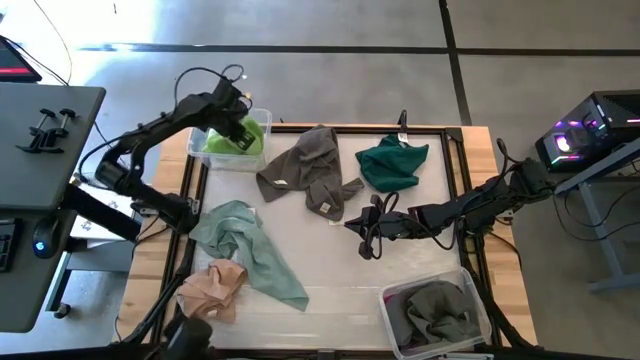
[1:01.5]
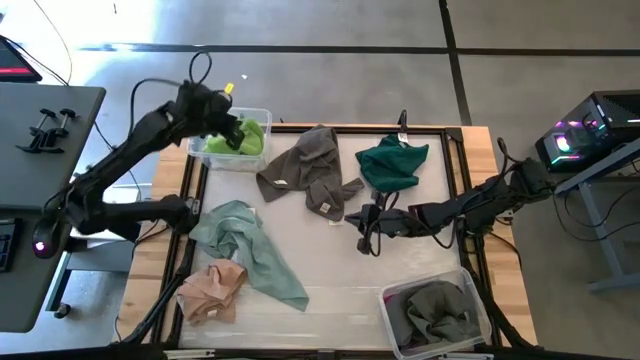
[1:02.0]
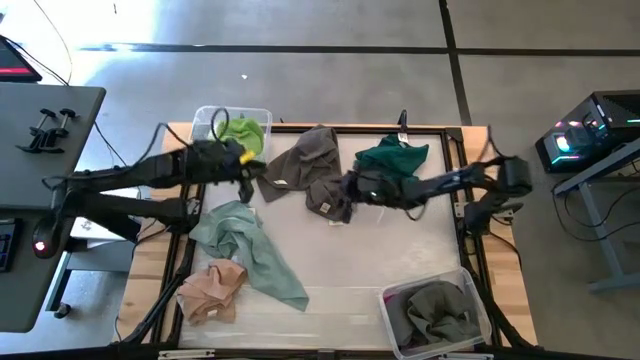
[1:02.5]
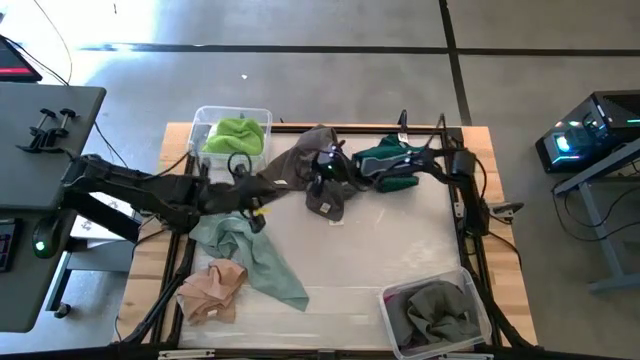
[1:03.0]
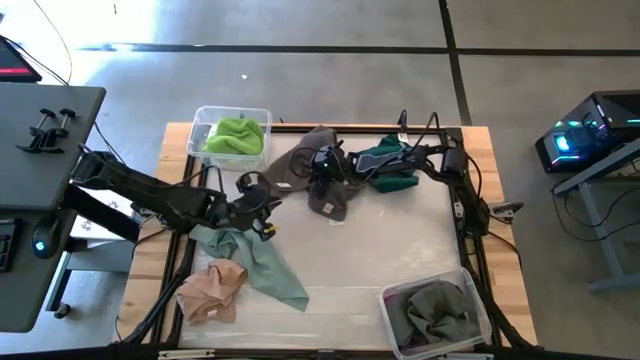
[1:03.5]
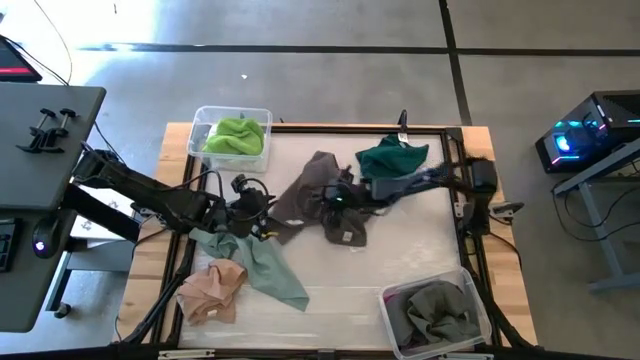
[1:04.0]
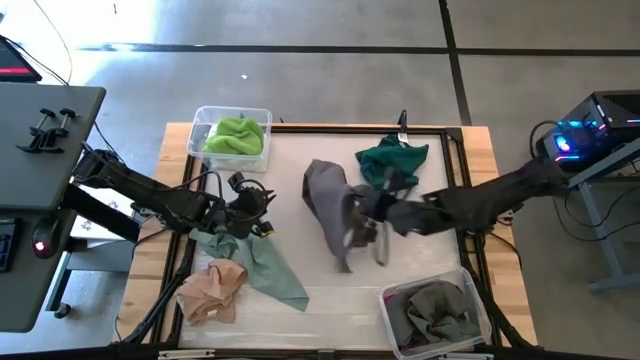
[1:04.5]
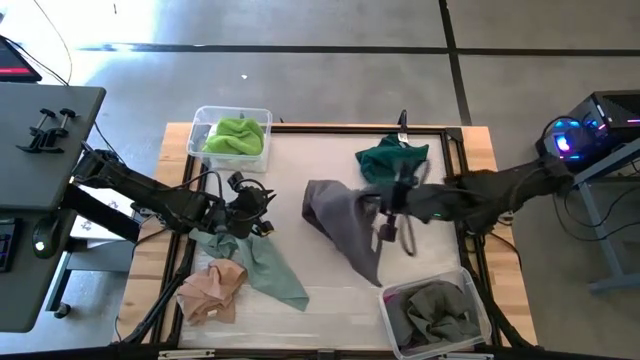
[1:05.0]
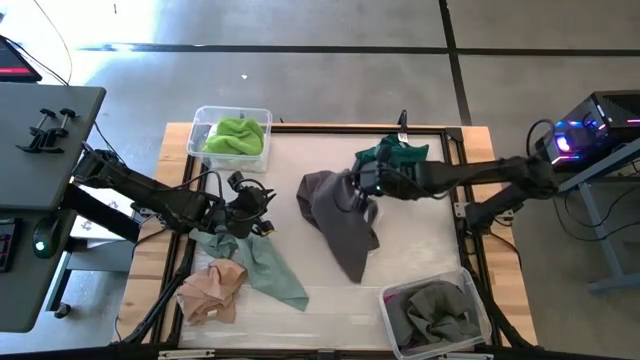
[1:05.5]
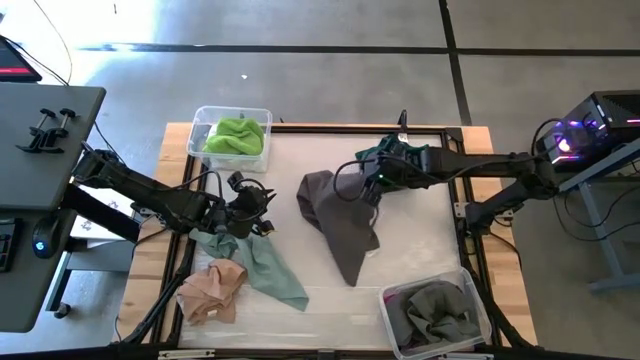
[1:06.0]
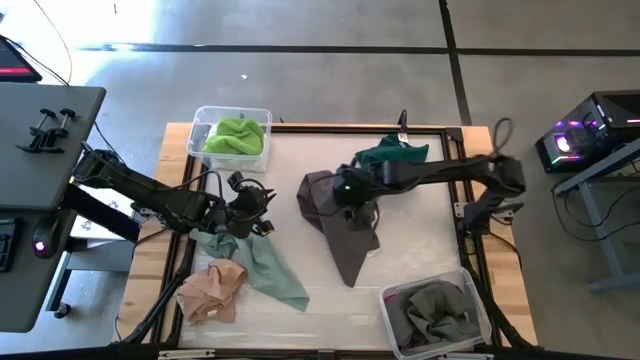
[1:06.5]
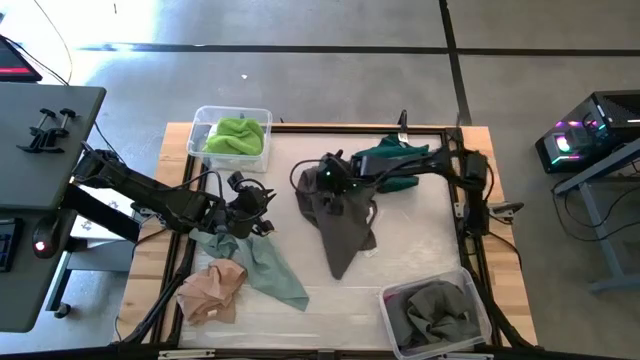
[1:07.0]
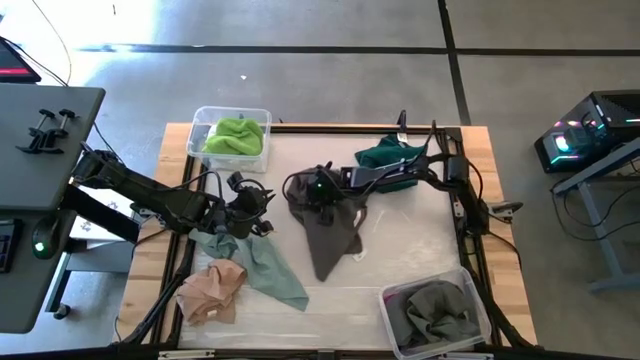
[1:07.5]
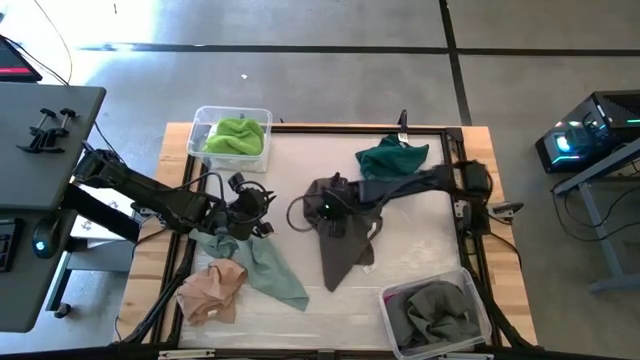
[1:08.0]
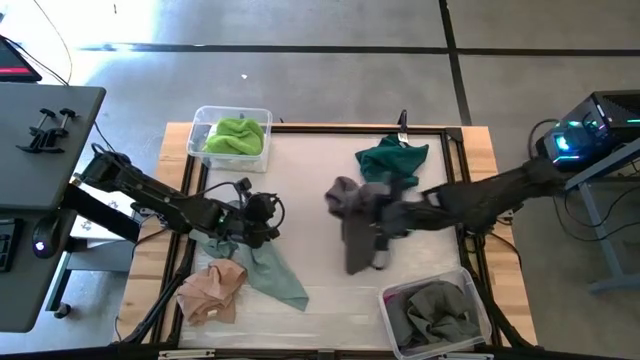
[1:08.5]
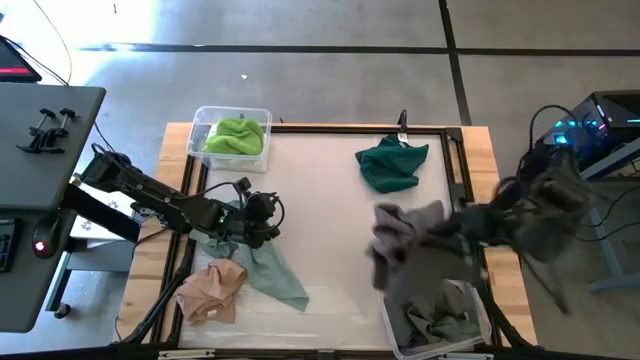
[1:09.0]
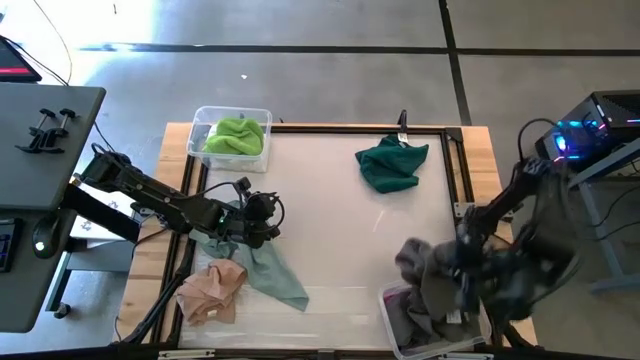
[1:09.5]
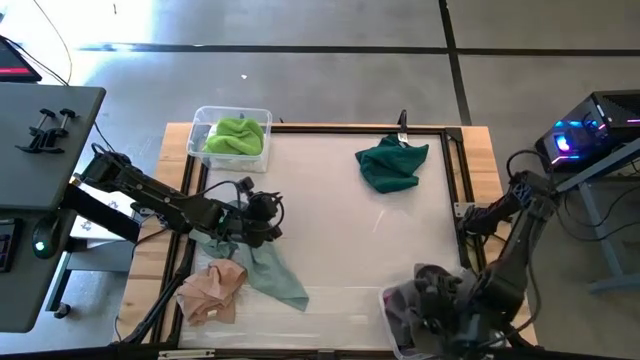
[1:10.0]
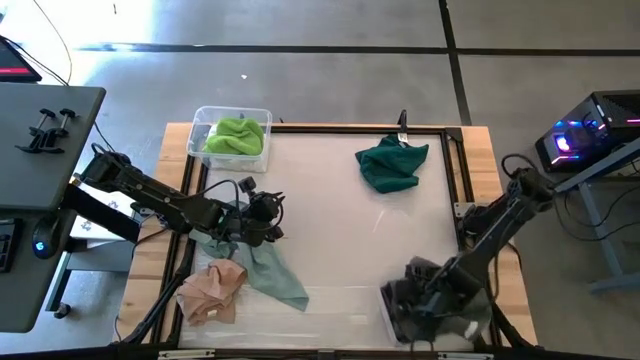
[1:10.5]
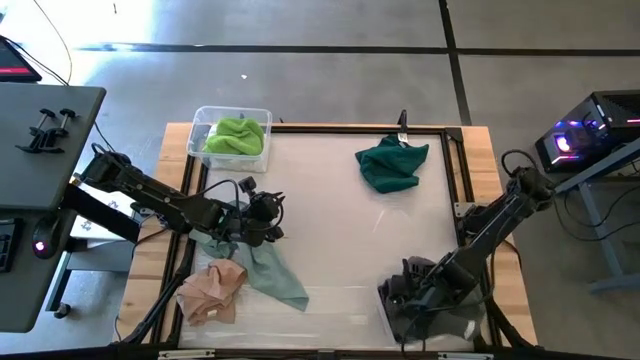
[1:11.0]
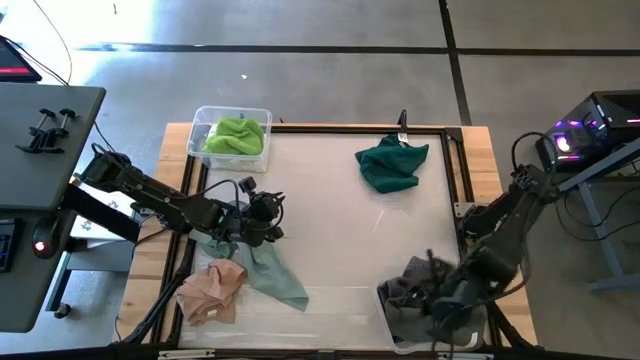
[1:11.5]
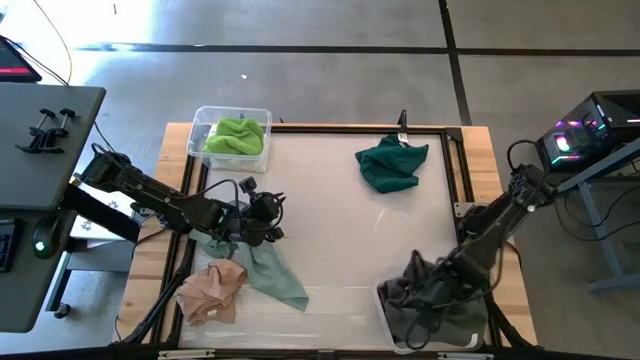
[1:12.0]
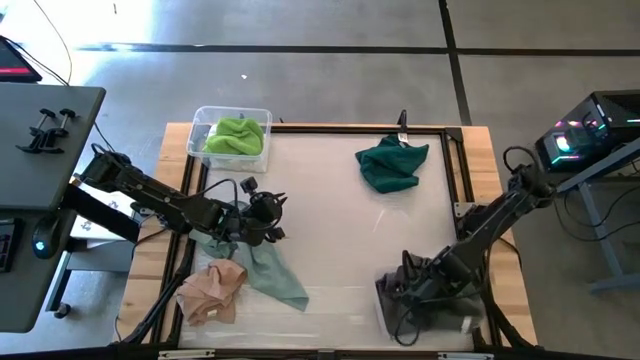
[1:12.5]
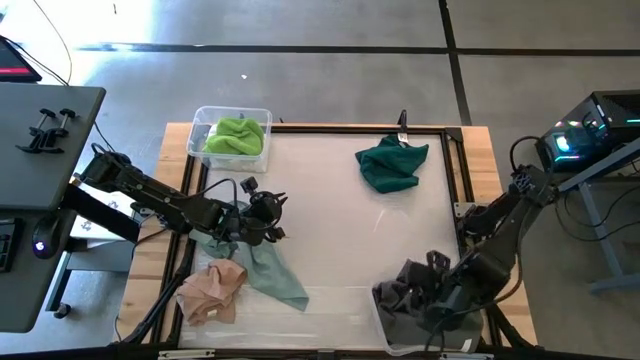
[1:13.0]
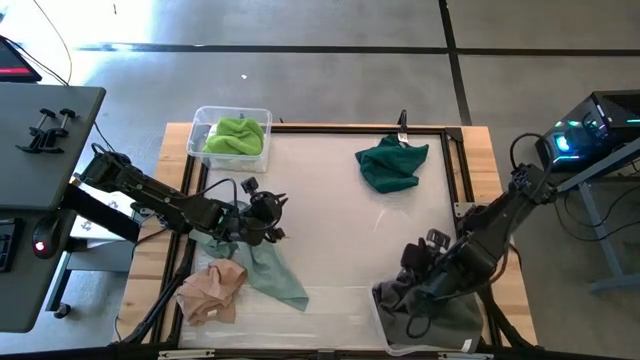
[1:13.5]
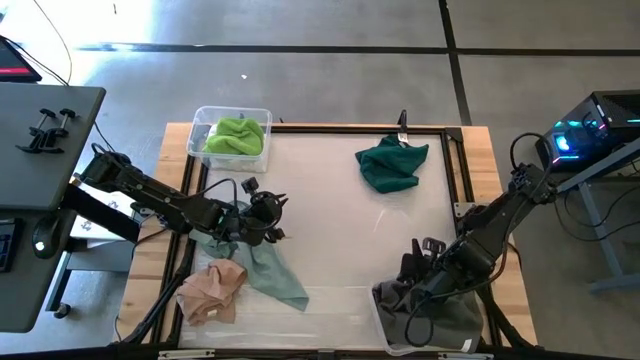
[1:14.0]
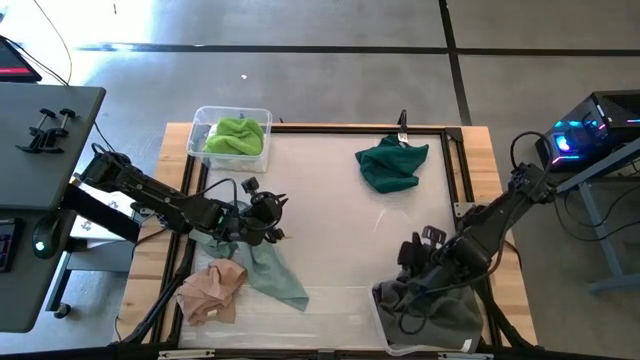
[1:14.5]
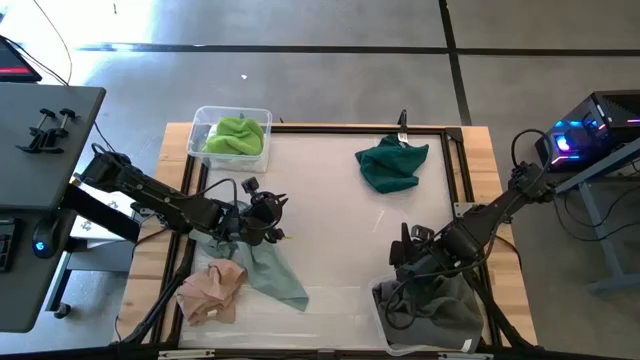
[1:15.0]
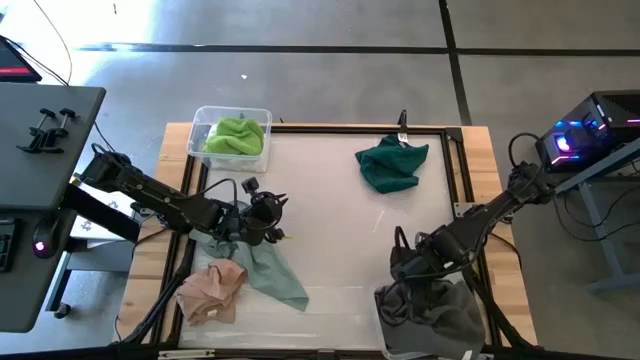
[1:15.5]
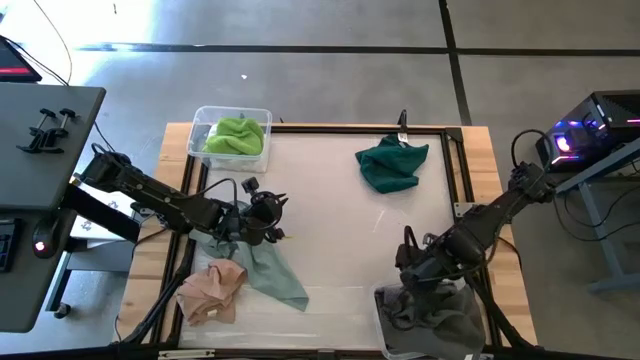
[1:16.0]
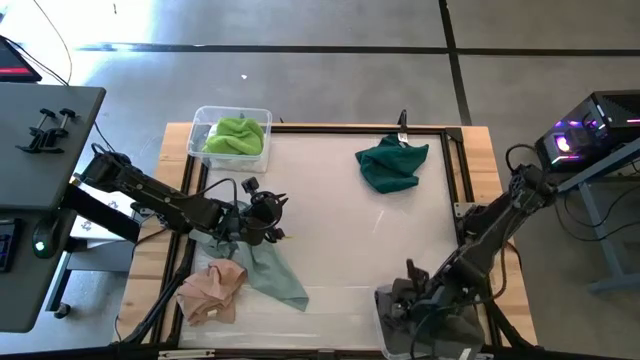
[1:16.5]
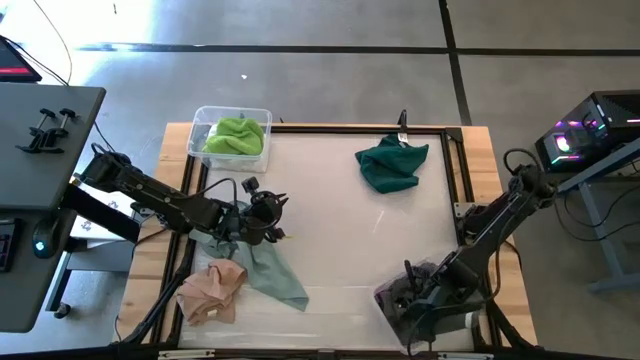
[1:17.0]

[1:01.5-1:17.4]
Task: Sort towels by color in basket
Put the gray towel into the bottom transparent bin

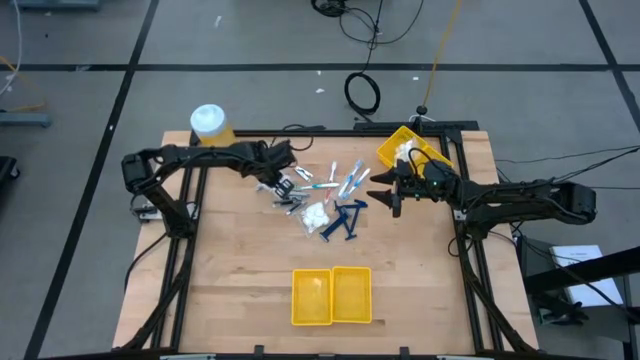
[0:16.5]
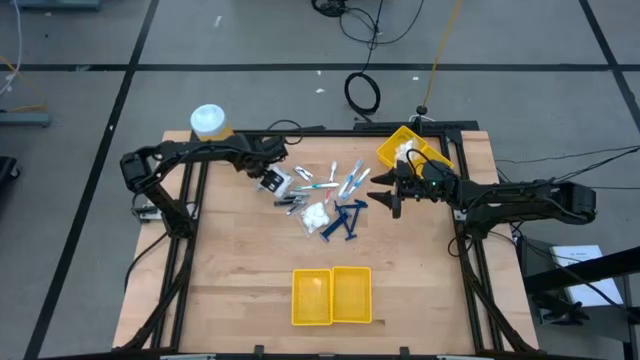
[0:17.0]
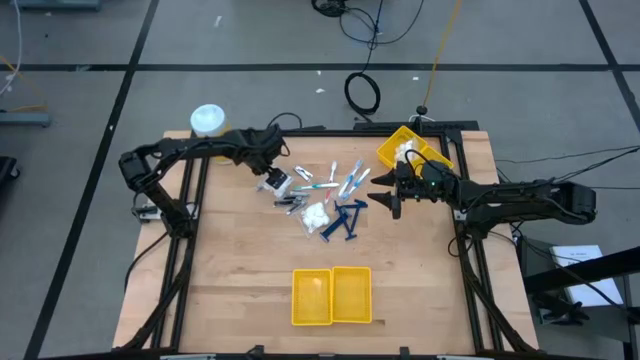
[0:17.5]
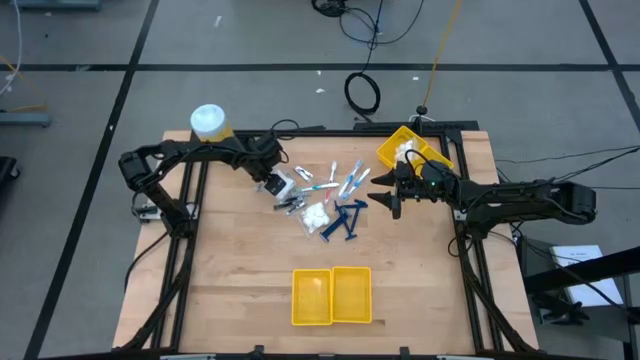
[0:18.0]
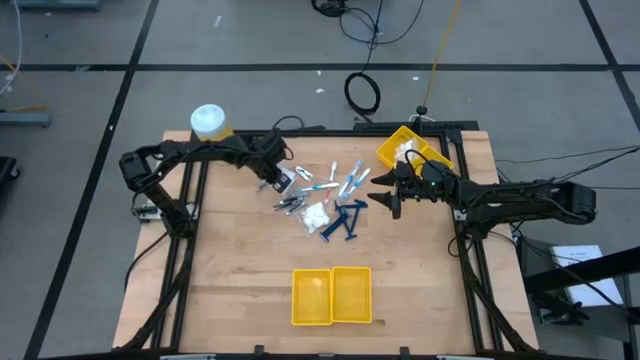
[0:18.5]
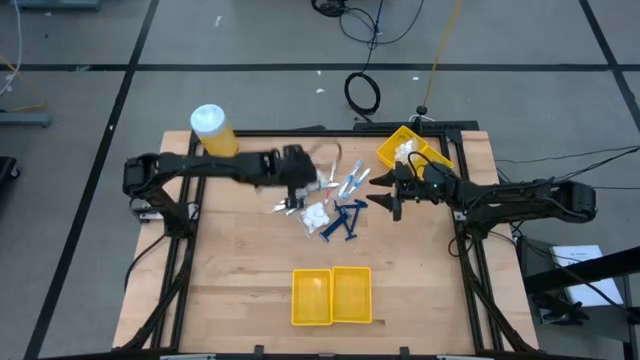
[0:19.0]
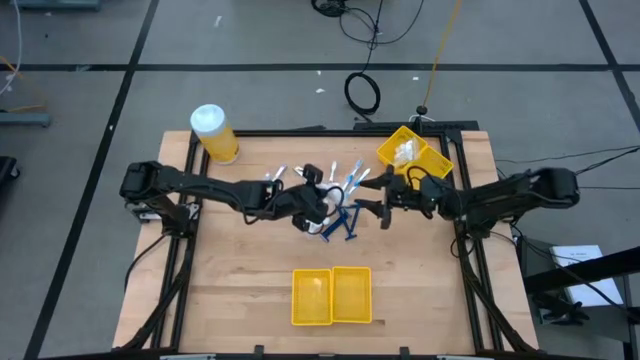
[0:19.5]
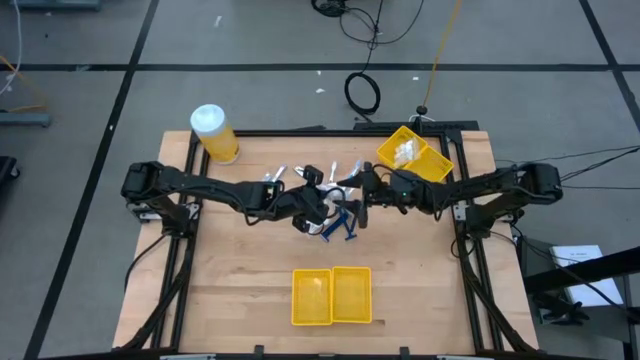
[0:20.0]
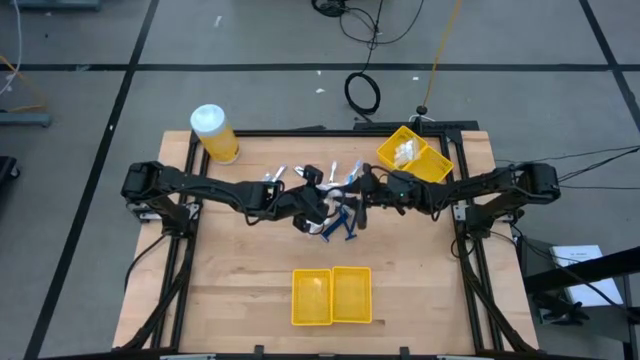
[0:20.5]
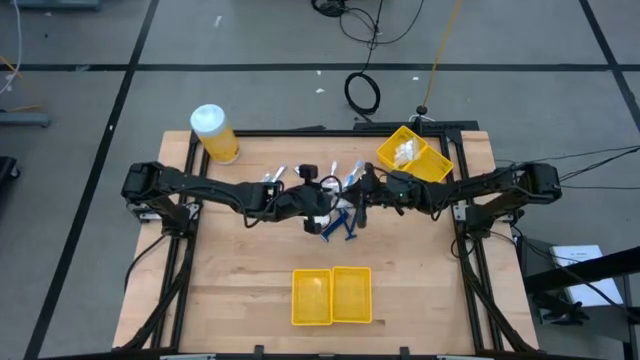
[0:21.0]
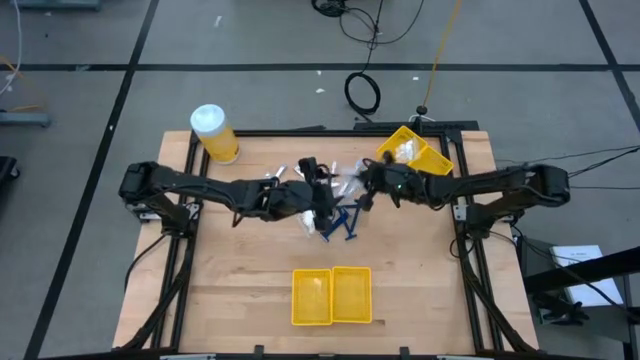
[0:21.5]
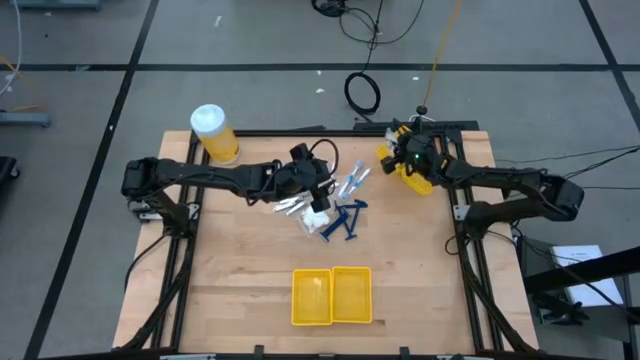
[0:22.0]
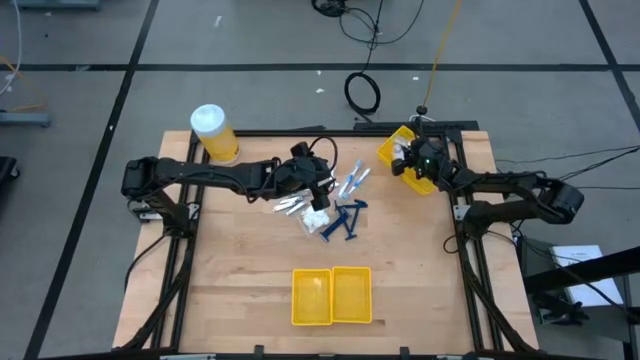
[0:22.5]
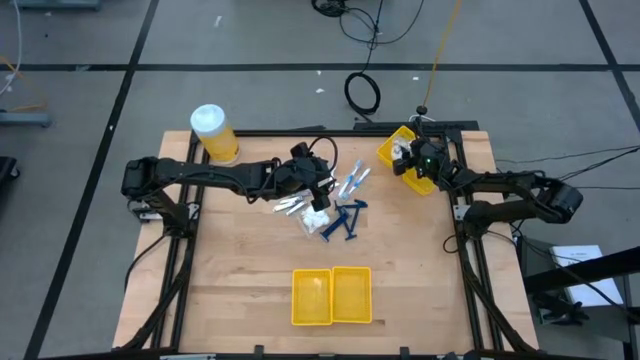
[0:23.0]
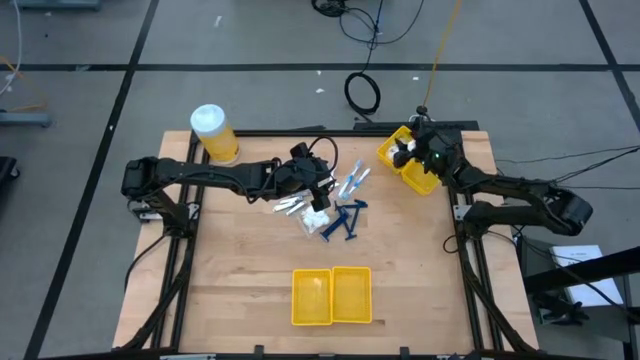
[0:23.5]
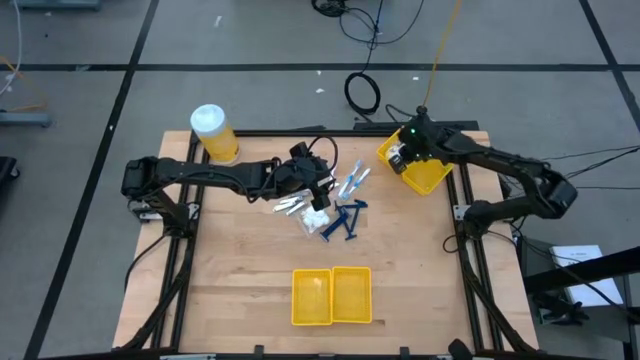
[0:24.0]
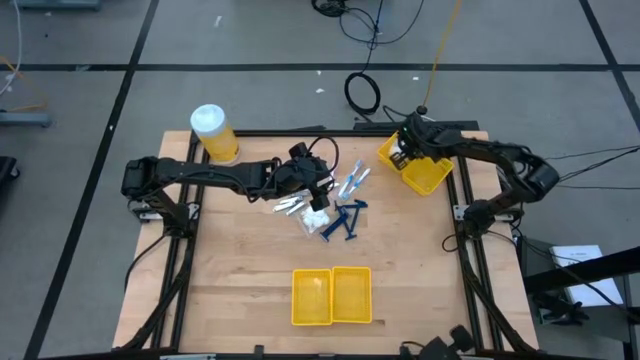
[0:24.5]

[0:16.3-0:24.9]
Task: Pick & Place Travel size toiletries
Put the top white cotton pack into the top left yellow bin
